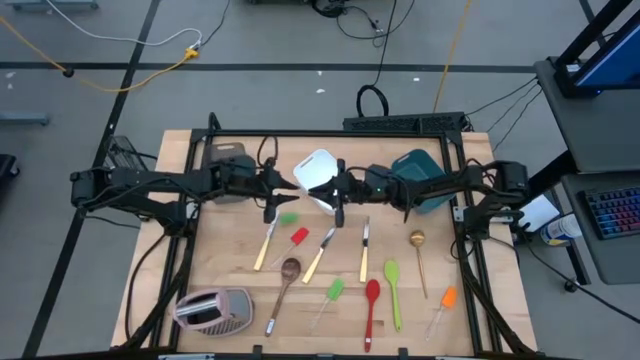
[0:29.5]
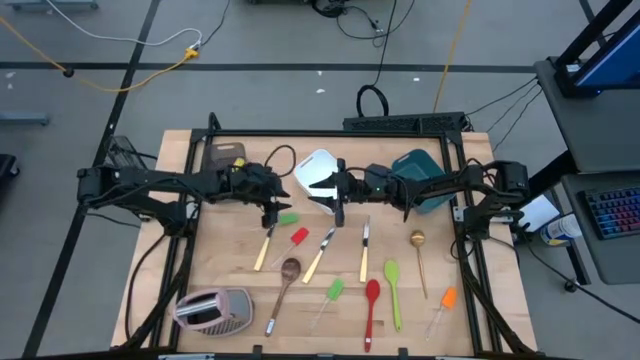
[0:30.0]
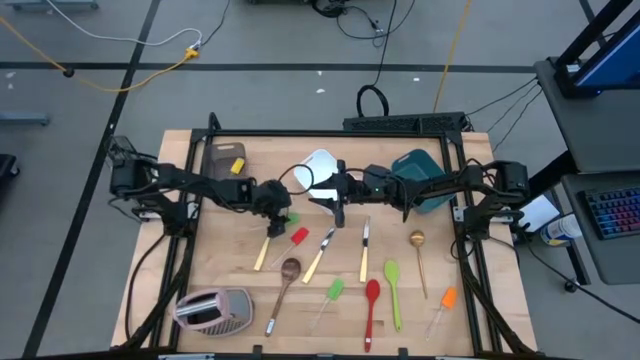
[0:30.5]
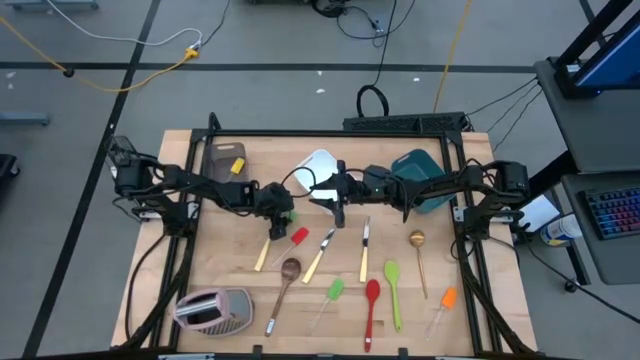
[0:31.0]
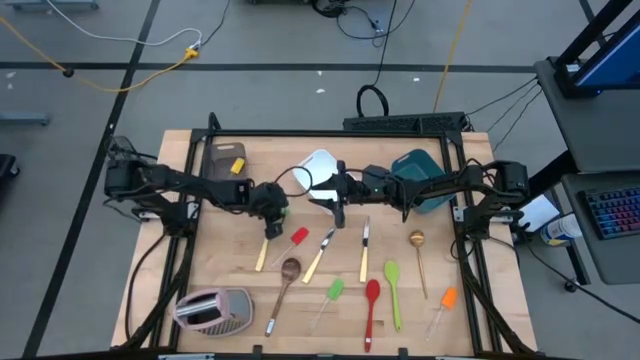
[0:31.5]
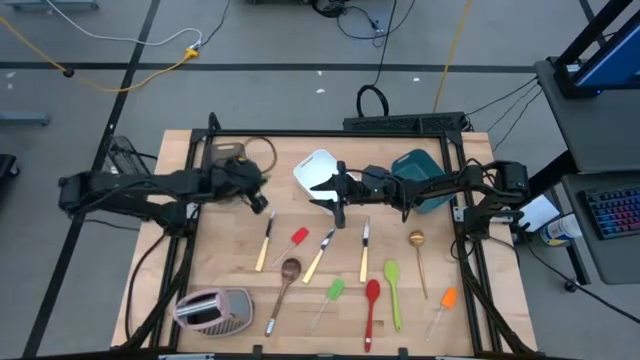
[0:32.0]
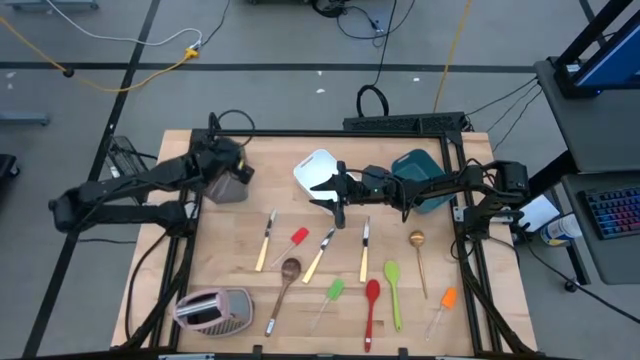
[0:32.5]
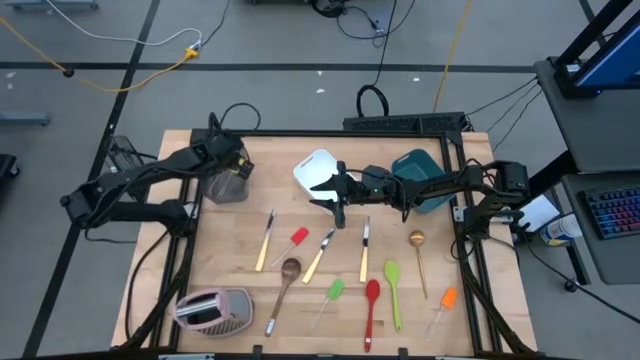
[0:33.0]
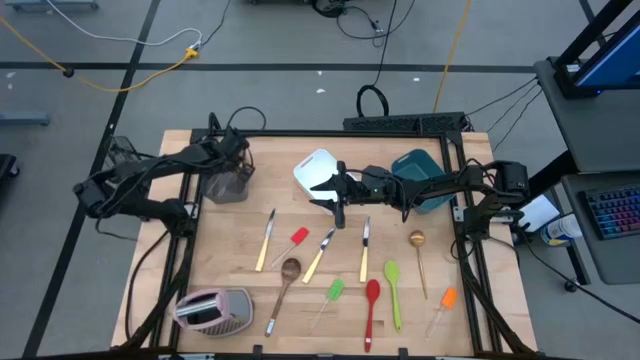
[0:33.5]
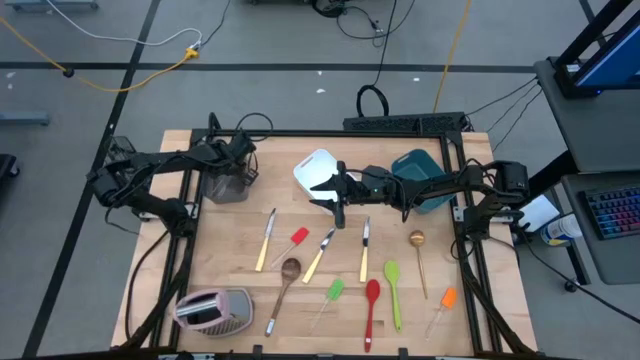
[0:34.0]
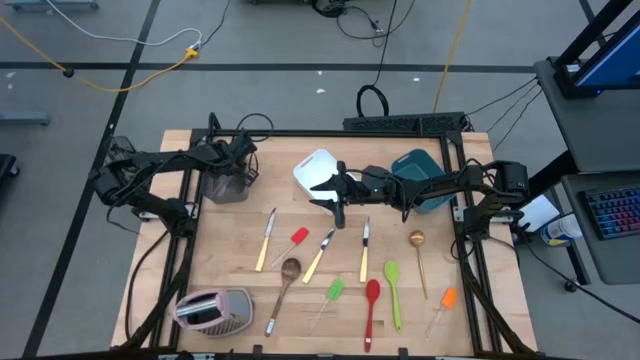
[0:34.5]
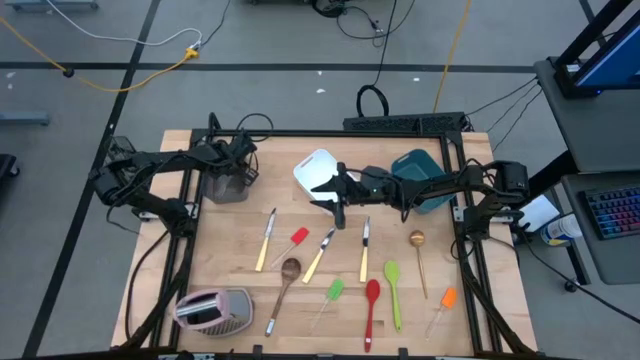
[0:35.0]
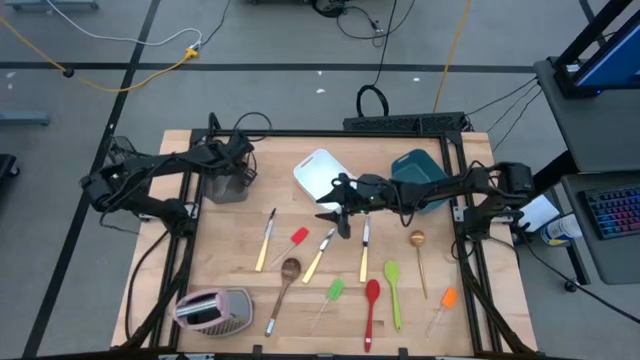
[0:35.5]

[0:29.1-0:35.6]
Task: Pick & Place Kitchen Items
Put the green spatula into the black bin

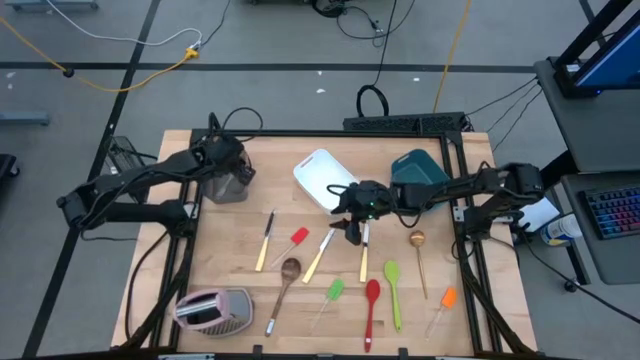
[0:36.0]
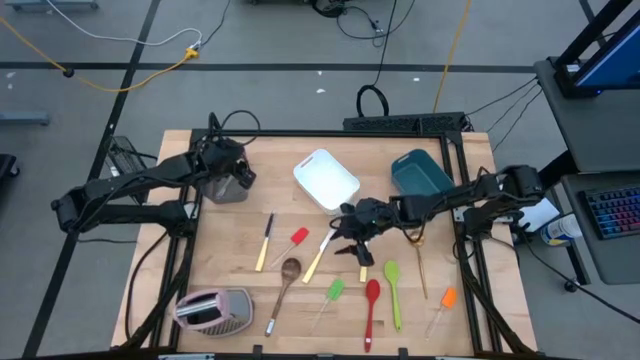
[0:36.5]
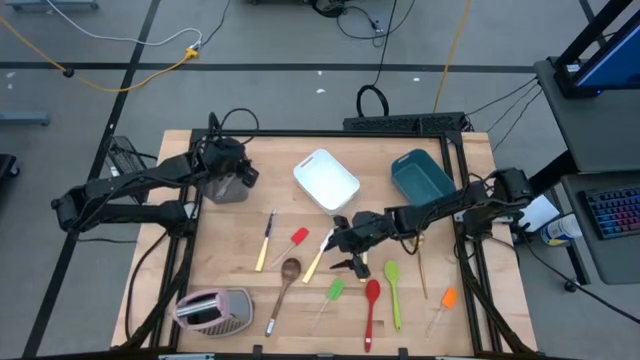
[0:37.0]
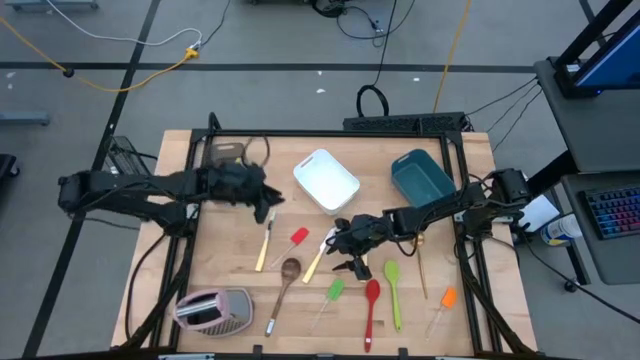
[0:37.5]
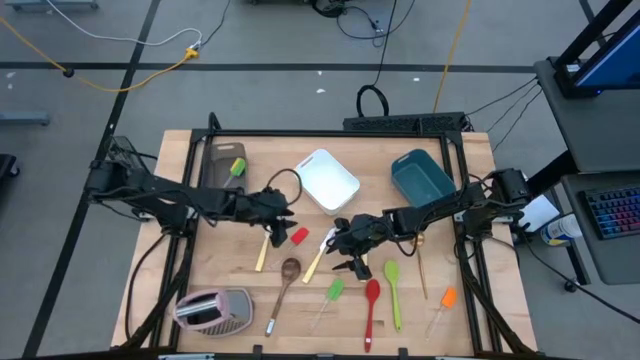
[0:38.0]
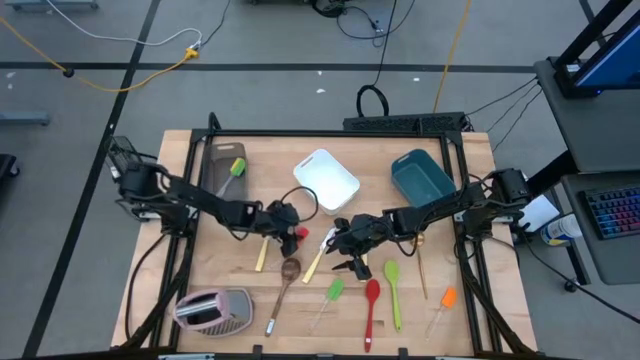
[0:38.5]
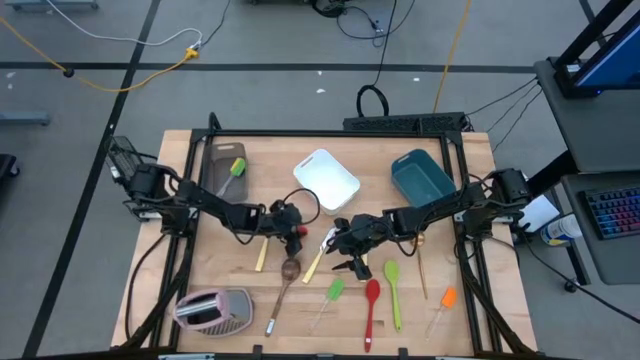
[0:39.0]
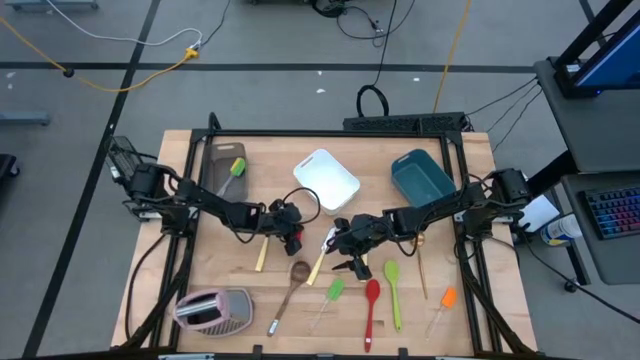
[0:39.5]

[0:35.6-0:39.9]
Put the red spatula into the black bin

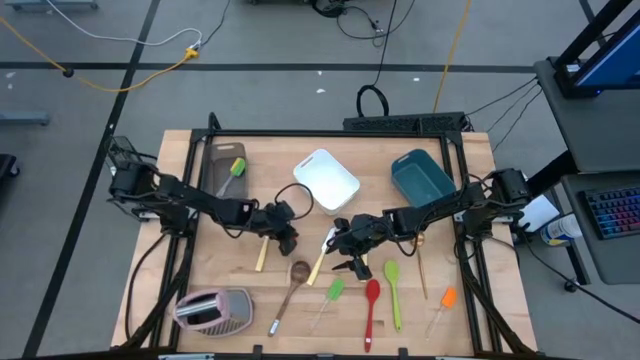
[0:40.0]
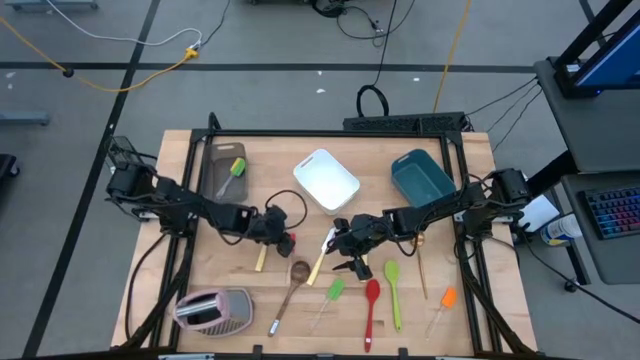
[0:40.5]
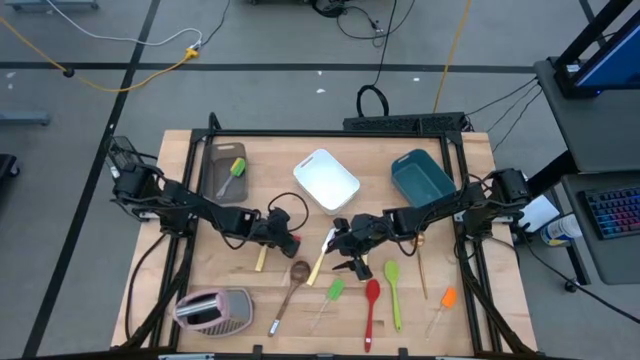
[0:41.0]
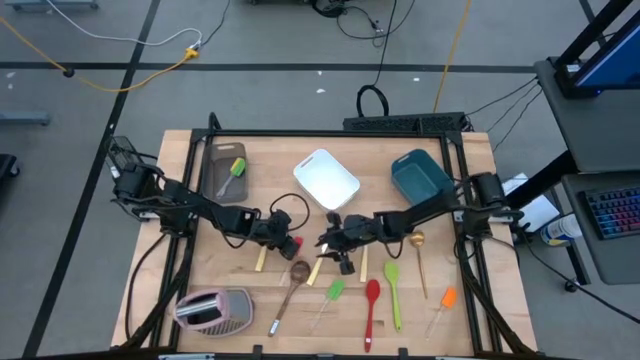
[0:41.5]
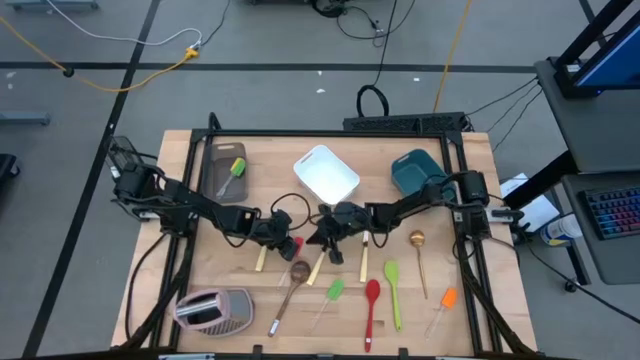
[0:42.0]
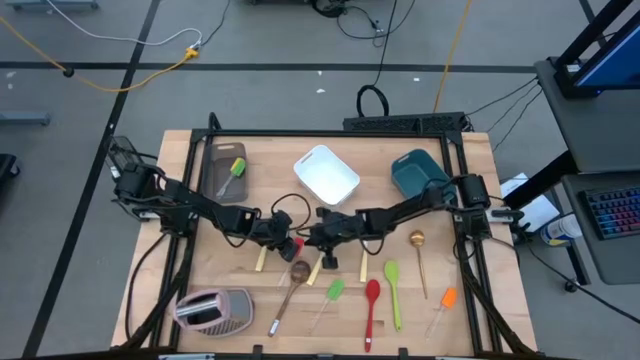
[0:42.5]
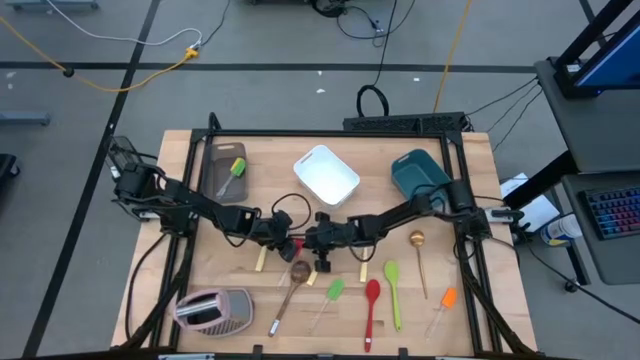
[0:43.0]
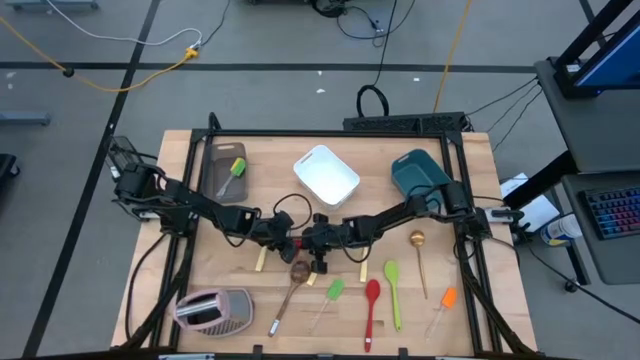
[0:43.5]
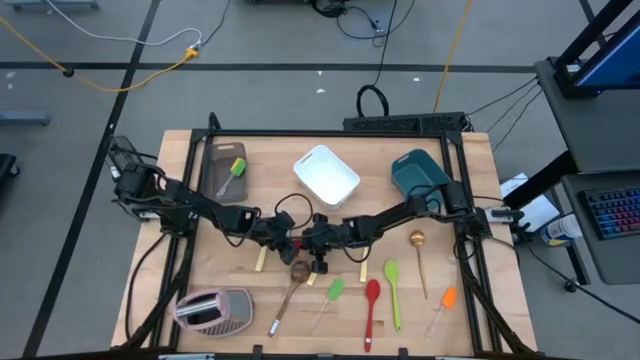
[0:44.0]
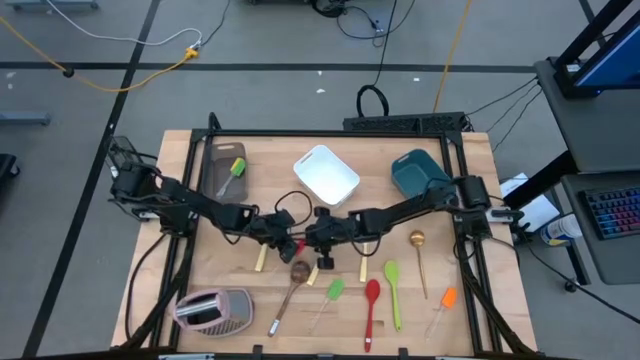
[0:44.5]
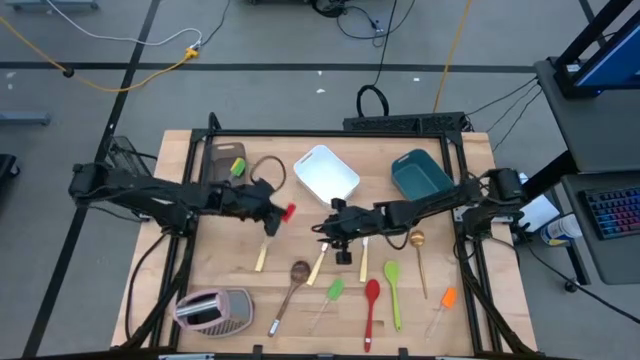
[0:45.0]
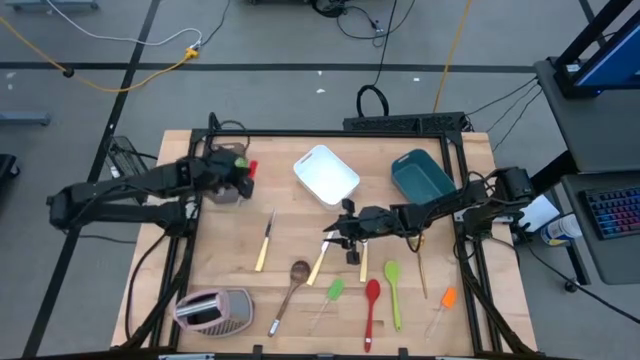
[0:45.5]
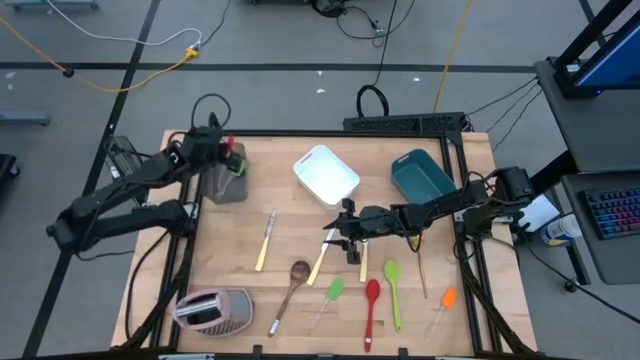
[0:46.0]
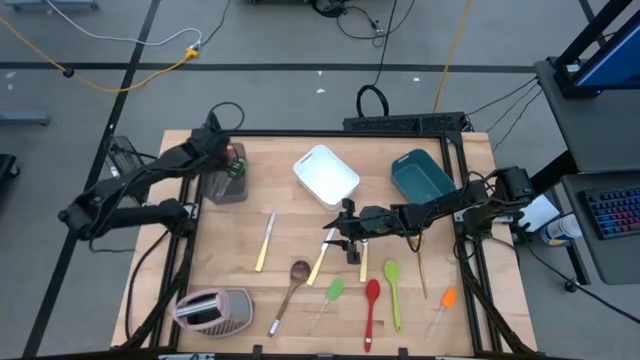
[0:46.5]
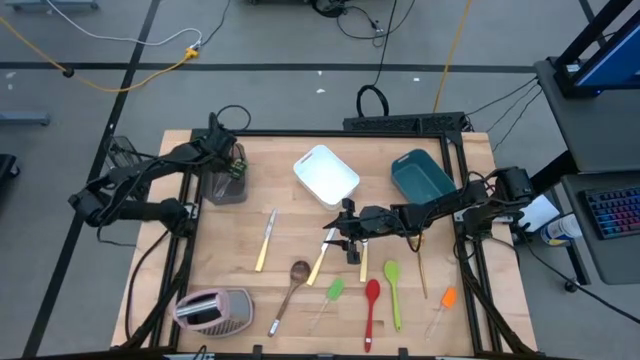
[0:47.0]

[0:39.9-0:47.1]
Put the red spatula into the black bin

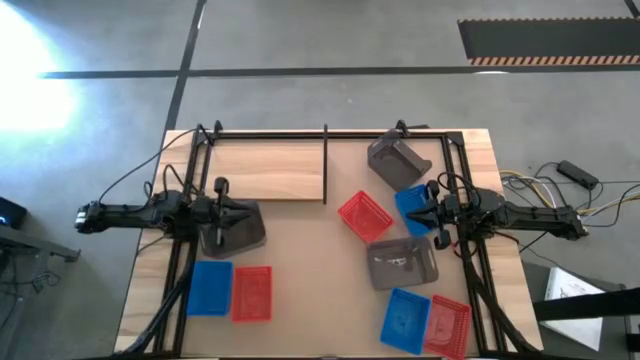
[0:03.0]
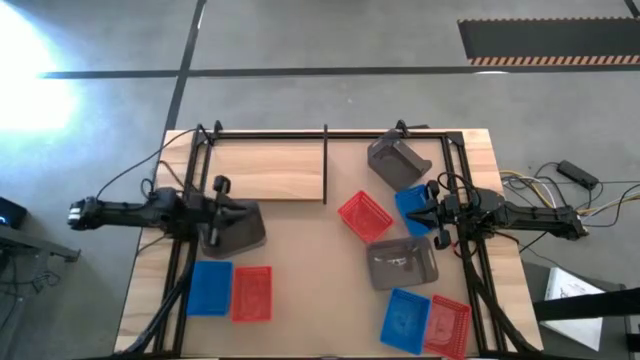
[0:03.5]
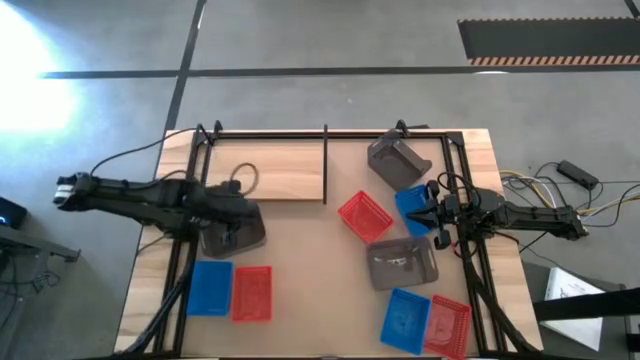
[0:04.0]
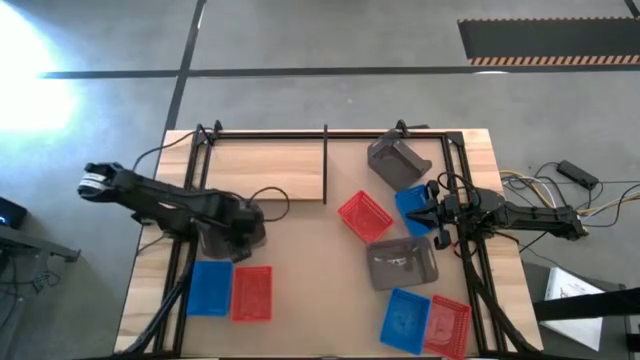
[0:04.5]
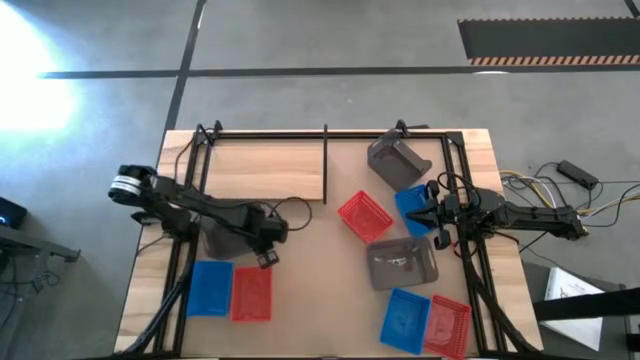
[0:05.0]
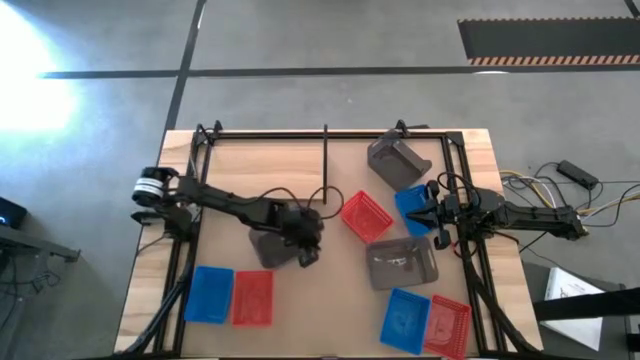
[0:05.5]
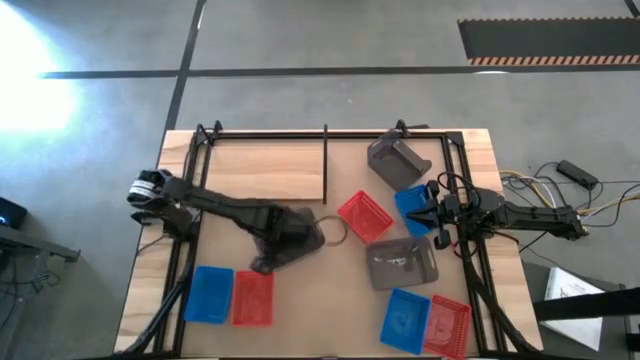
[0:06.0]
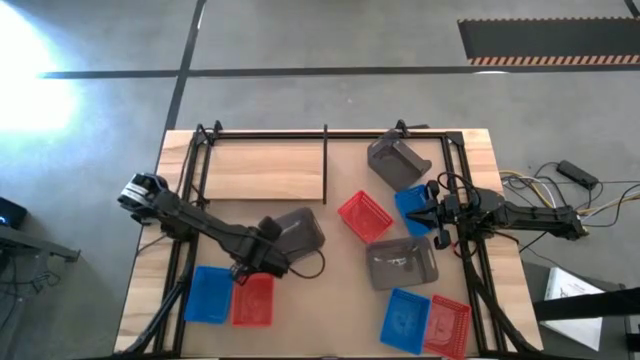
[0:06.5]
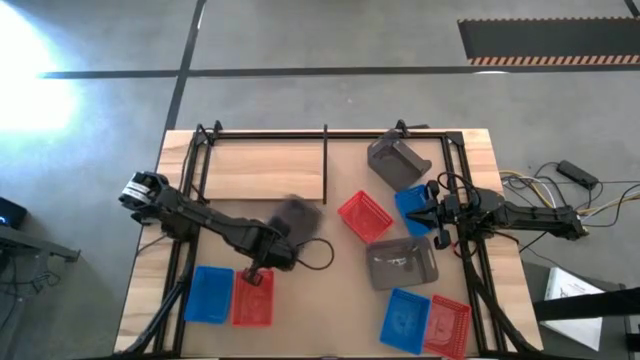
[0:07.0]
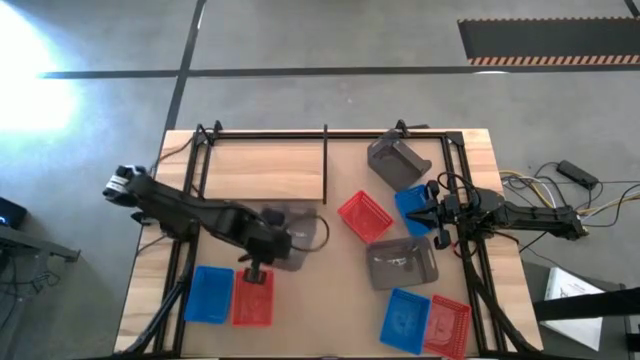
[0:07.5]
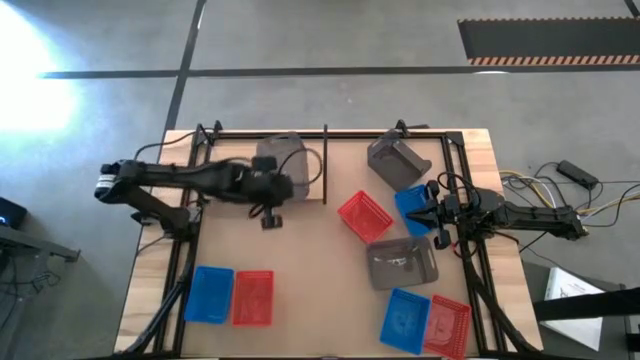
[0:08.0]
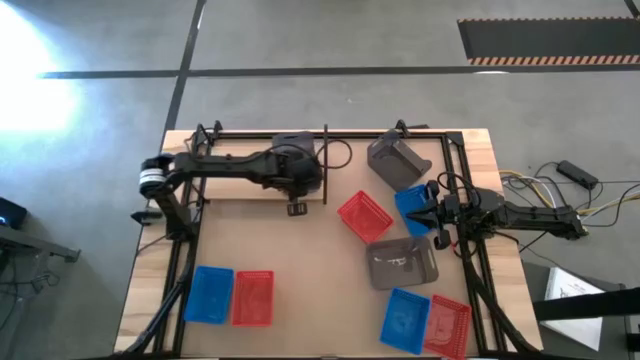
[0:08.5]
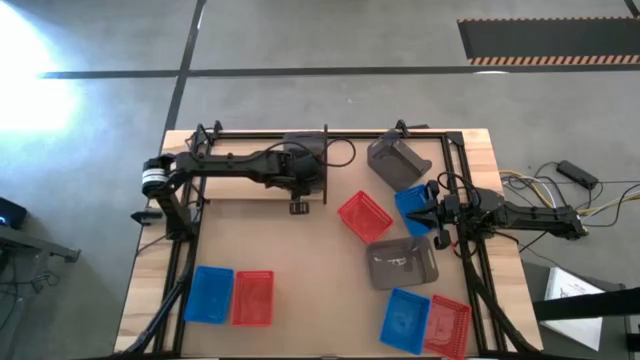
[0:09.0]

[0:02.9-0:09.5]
Task: Stack baskets on shelf by color
Put the middle black bin on the shelf
